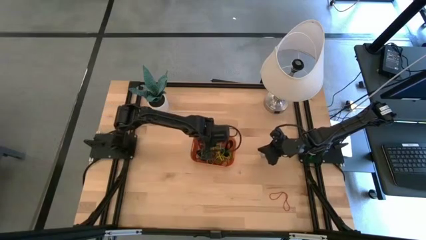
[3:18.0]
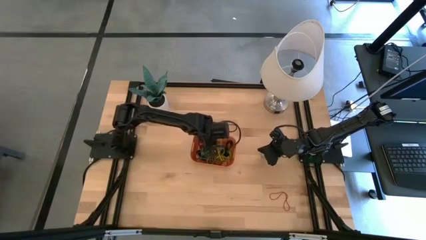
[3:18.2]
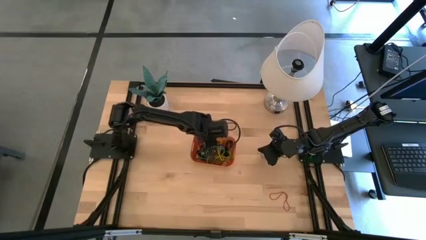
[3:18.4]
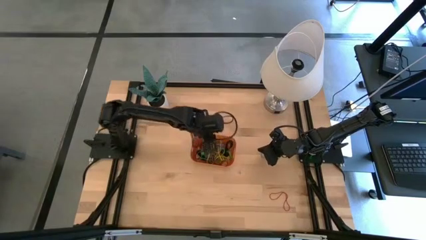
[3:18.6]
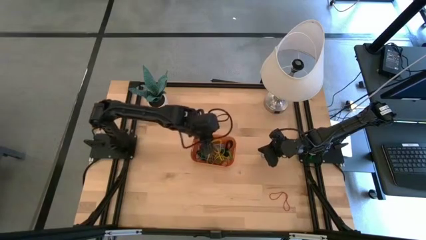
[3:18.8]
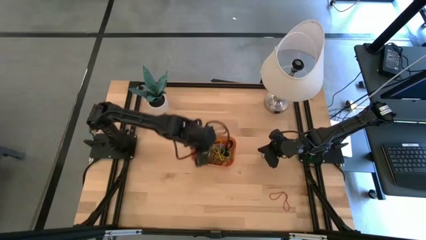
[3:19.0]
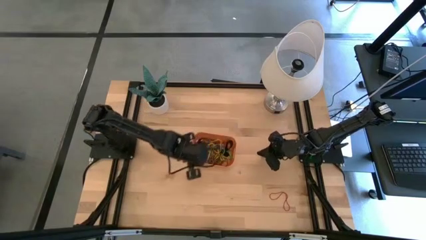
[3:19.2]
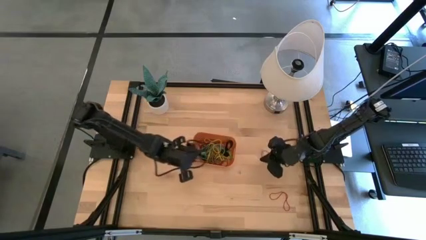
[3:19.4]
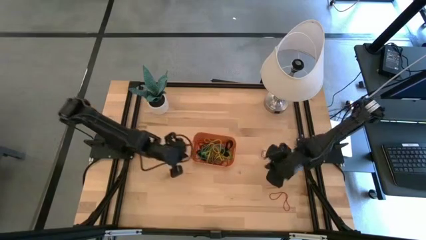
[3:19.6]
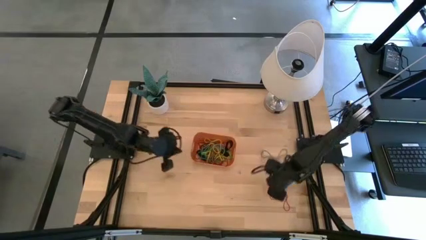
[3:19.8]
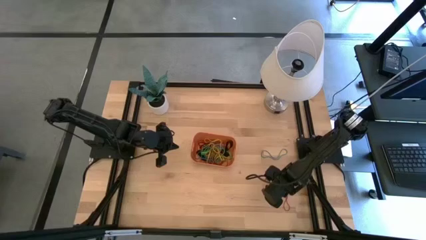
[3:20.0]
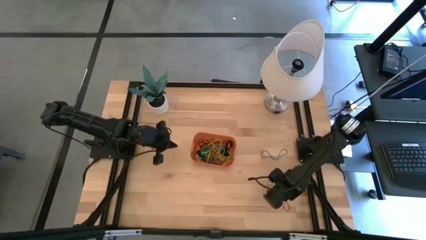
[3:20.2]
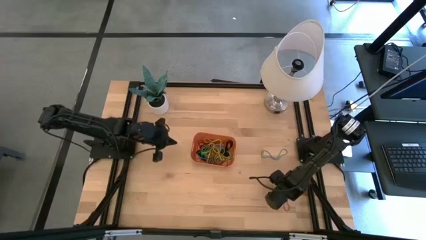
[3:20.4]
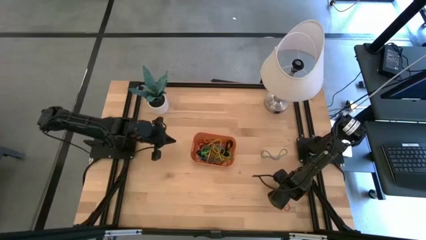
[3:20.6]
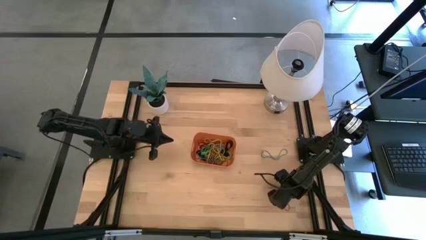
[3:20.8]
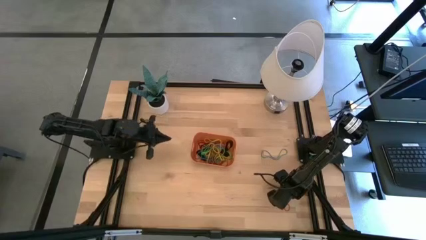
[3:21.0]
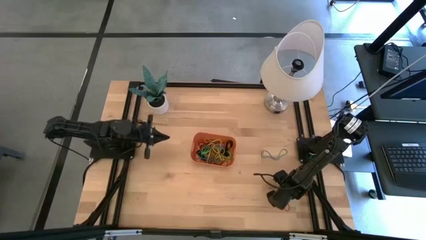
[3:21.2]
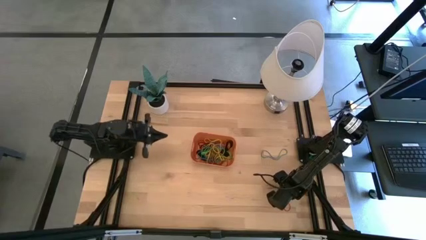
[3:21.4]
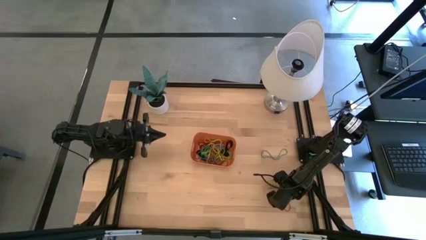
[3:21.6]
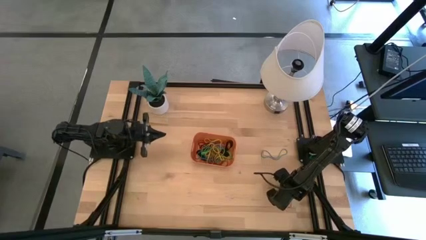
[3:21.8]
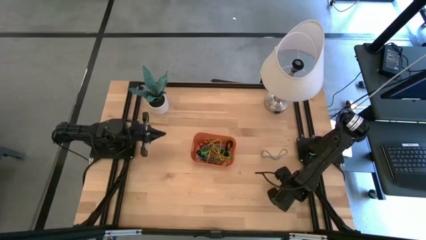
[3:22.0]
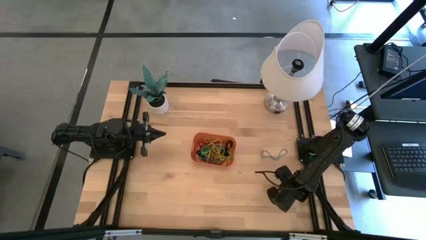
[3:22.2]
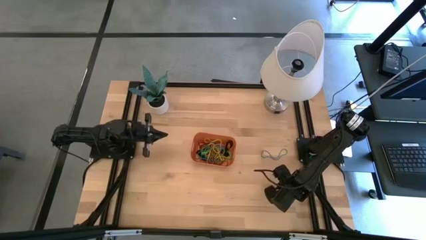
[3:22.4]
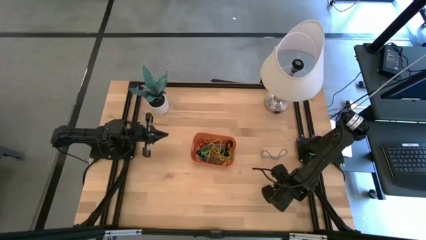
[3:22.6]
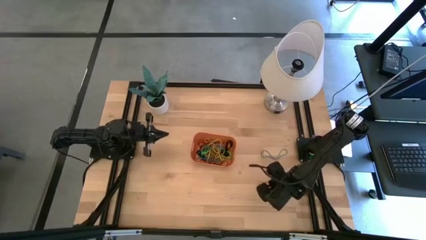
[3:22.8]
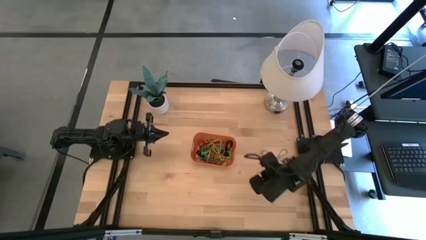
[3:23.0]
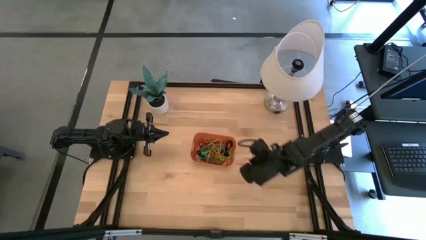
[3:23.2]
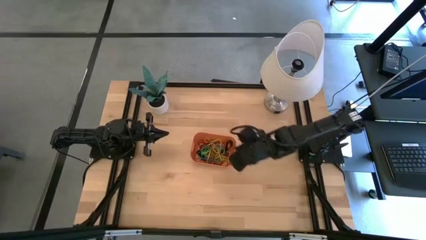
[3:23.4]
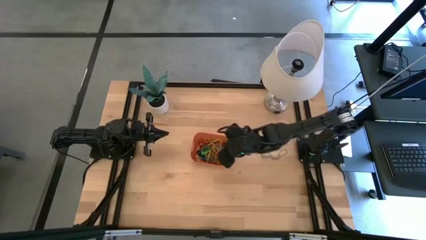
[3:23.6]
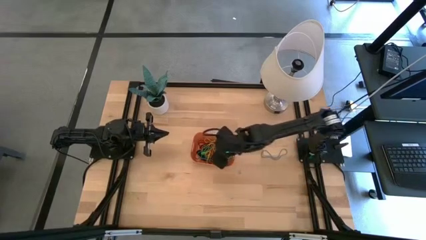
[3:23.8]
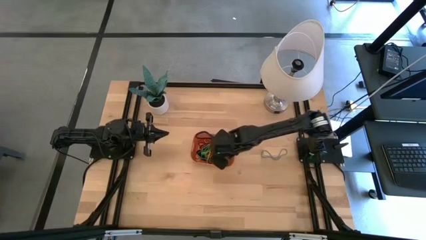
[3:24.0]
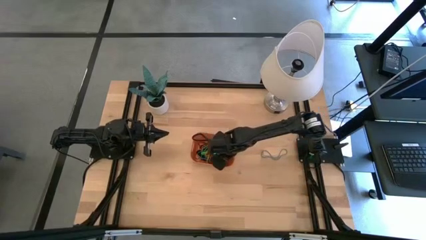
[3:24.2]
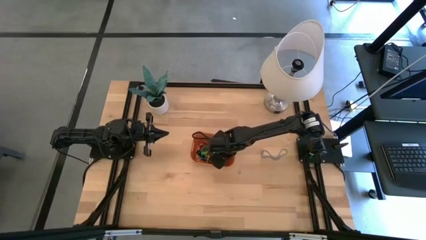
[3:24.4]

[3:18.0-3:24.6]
Task: Pick and place rubber bands into bin
Put the red rubber band into the orange bin

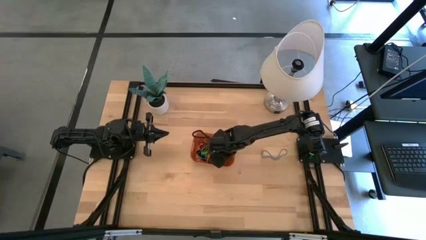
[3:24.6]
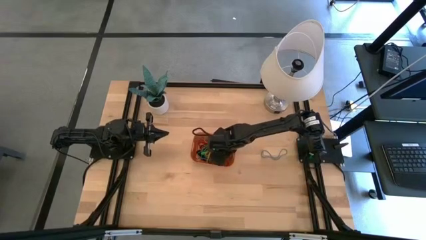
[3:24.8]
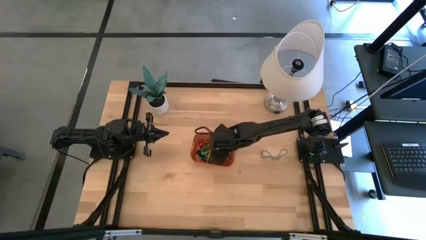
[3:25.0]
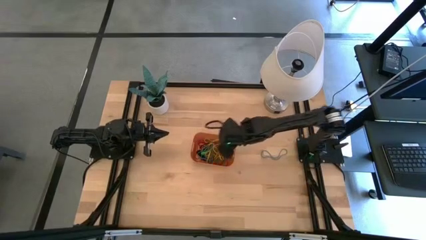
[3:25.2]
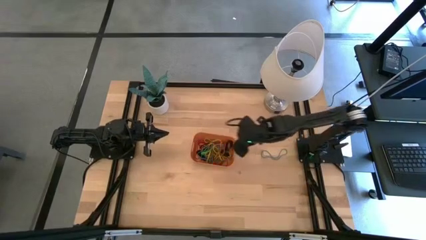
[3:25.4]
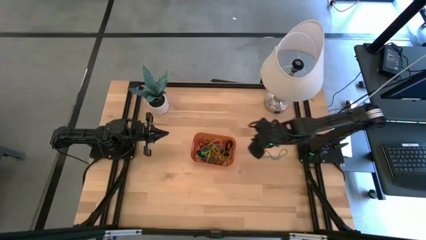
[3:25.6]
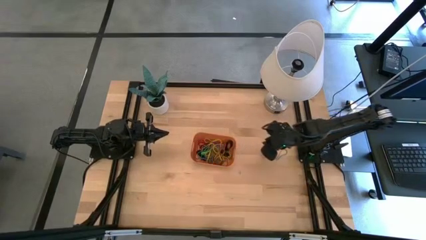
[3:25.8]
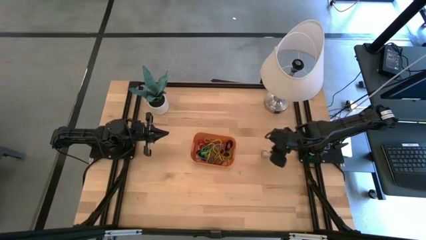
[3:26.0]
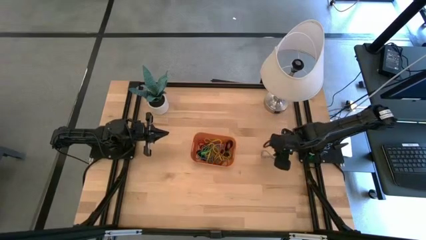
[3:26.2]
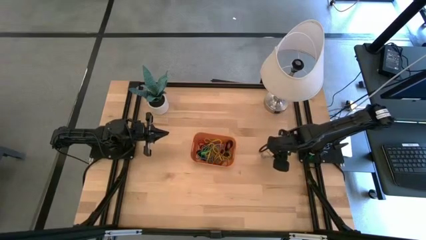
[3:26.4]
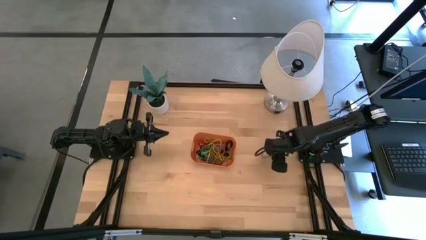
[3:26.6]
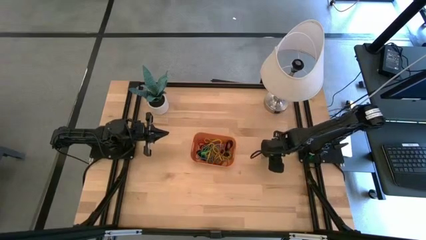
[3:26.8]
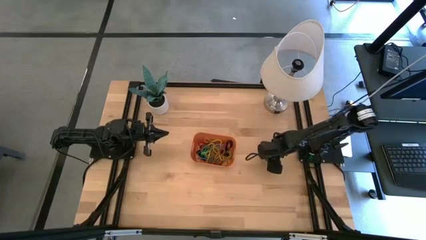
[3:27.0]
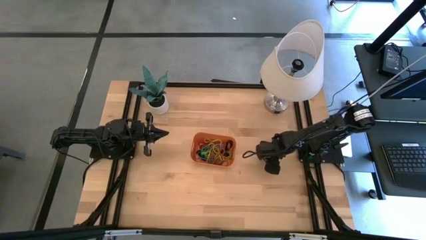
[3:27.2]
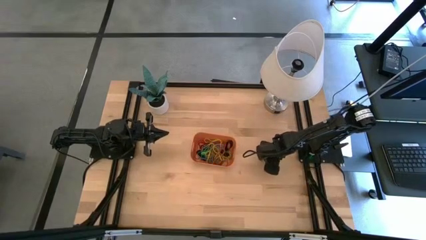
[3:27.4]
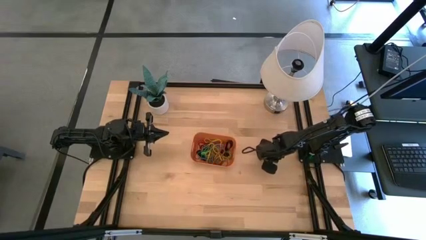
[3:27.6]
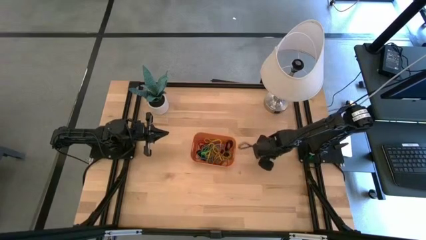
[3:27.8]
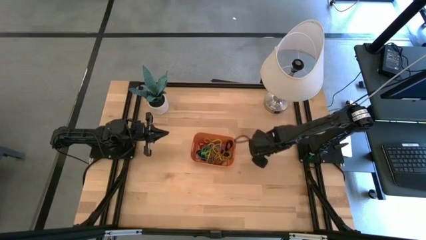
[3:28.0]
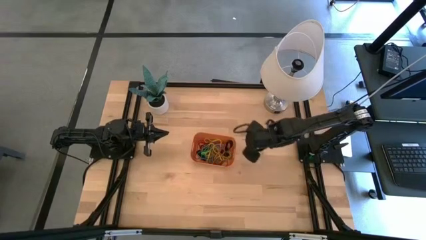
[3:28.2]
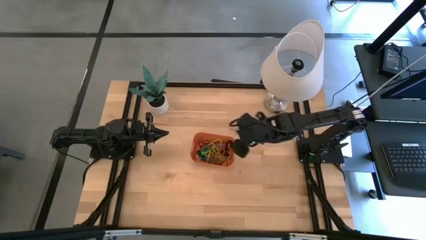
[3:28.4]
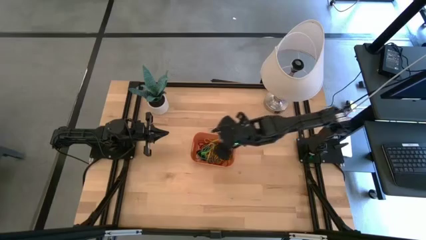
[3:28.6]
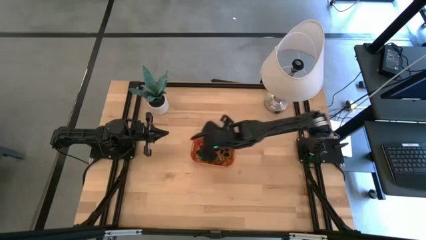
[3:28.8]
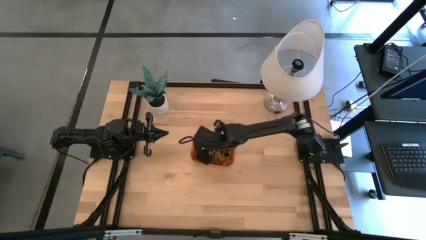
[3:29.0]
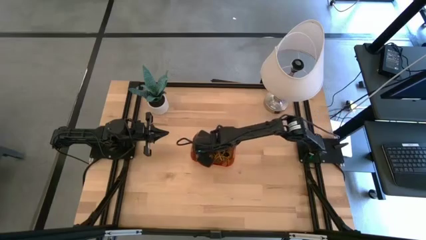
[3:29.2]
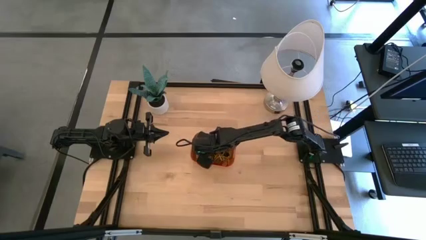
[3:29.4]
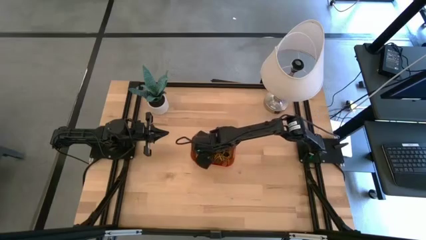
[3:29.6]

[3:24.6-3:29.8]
Put the blue rubber band into the orange bin

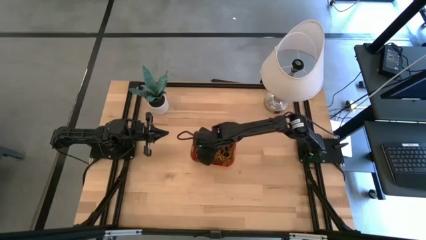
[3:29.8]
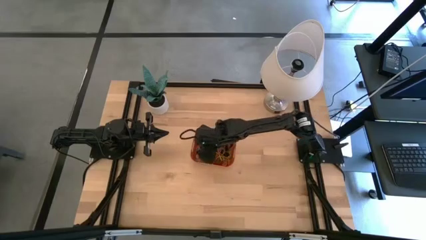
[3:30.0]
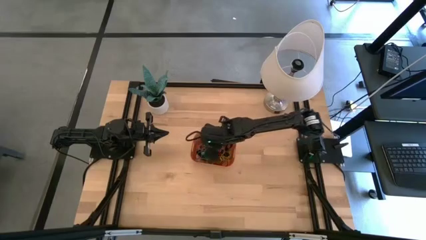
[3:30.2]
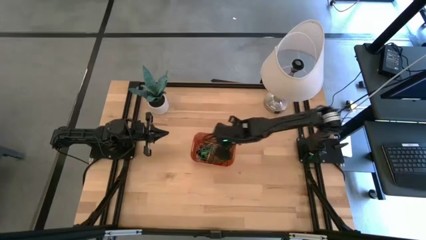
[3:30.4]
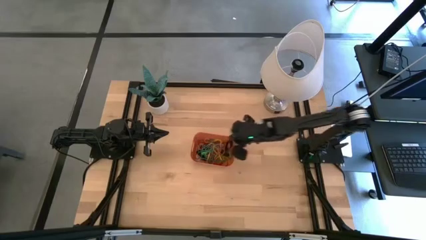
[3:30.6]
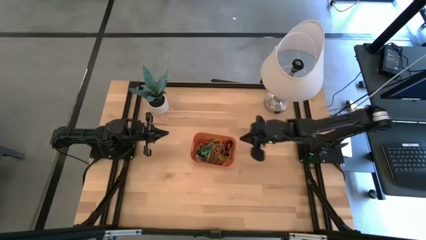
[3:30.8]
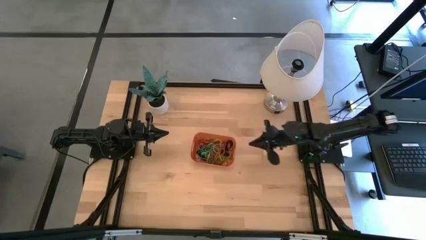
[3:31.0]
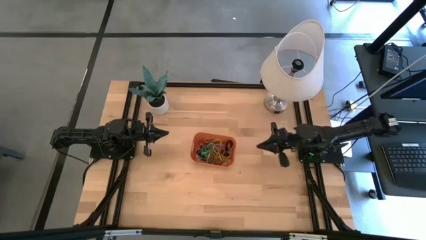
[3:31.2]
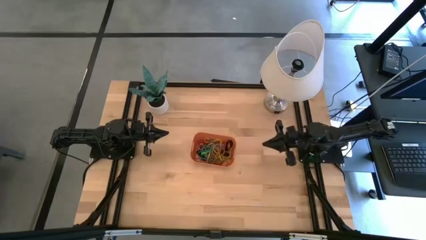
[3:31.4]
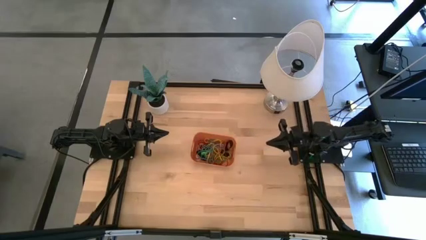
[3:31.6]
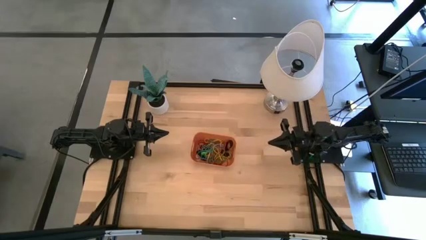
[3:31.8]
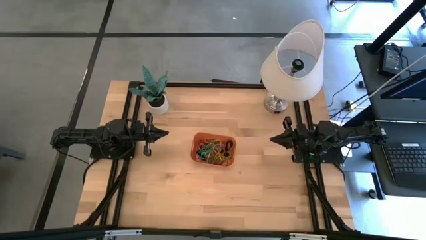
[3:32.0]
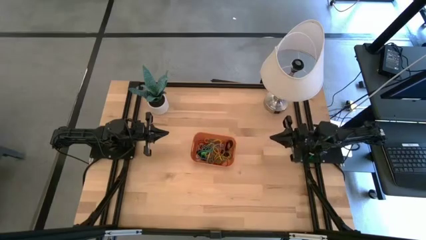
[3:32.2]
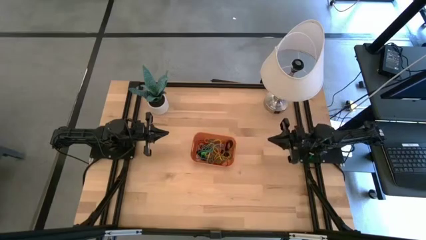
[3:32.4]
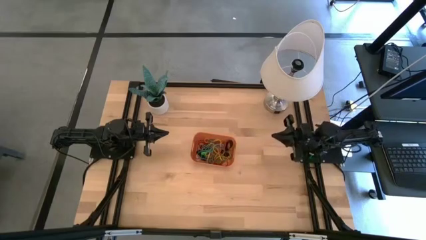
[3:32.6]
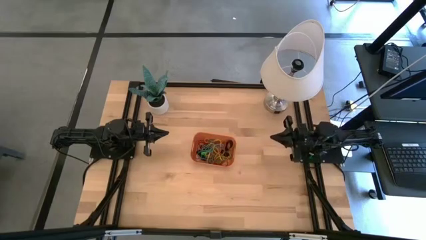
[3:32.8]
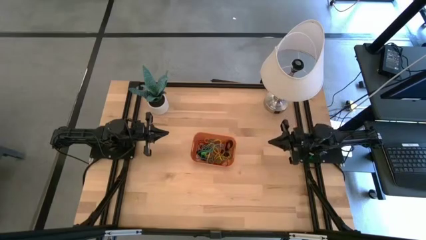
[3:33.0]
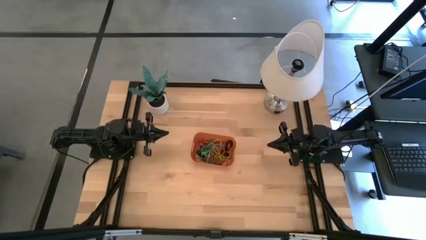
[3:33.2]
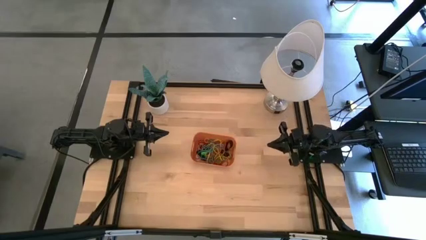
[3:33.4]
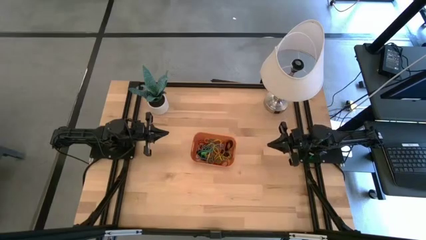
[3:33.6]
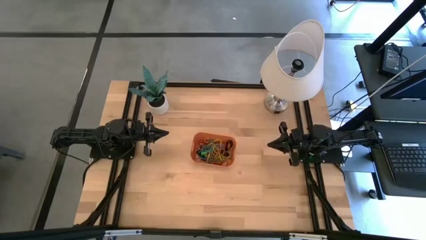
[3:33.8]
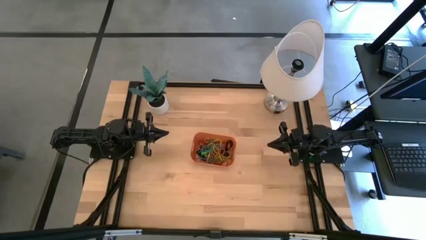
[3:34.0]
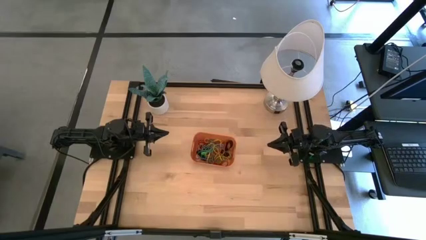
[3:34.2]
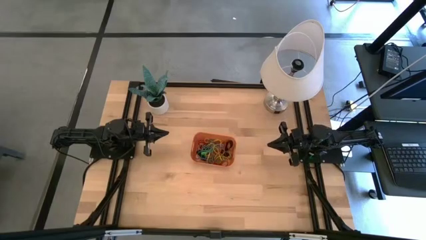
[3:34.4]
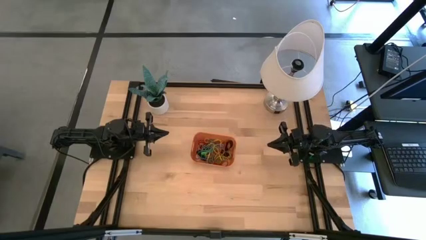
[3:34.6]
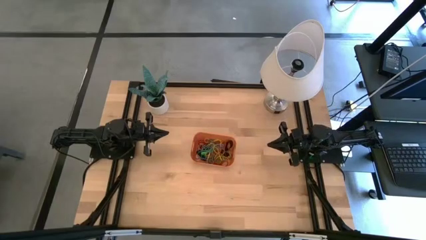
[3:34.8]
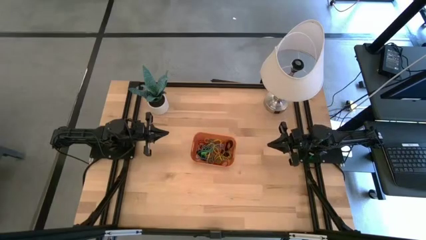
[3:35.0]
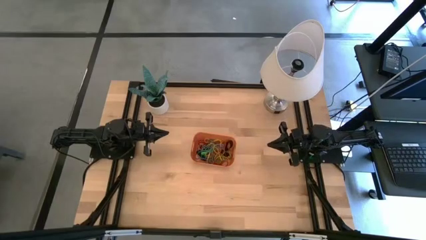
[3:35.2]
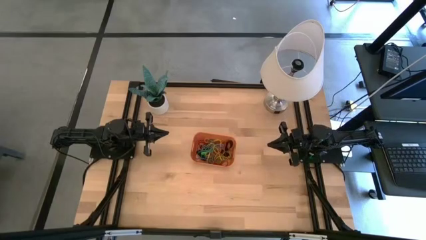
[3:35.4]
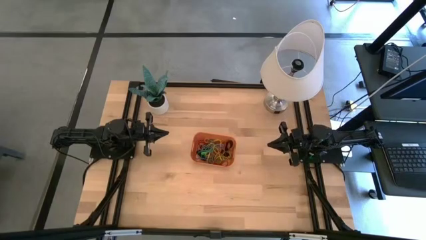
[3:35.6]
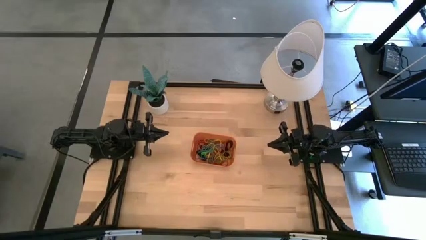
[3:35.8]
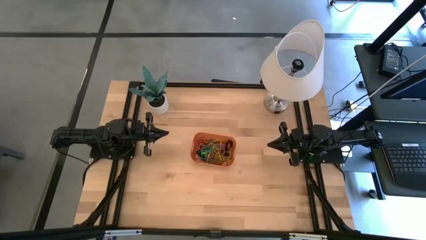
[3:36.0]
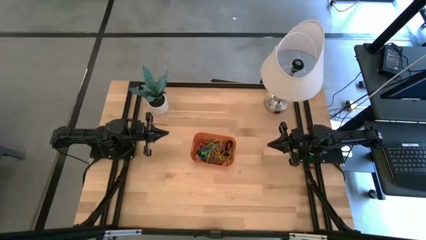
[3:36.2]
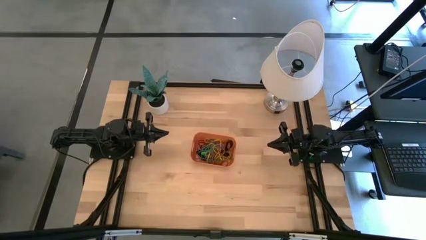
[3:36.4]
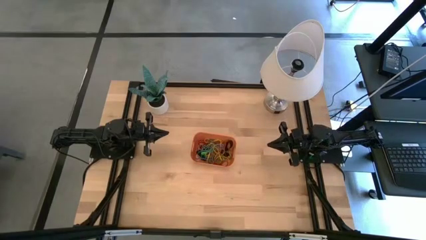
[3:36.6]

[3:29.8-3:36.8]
Return to Home Position
